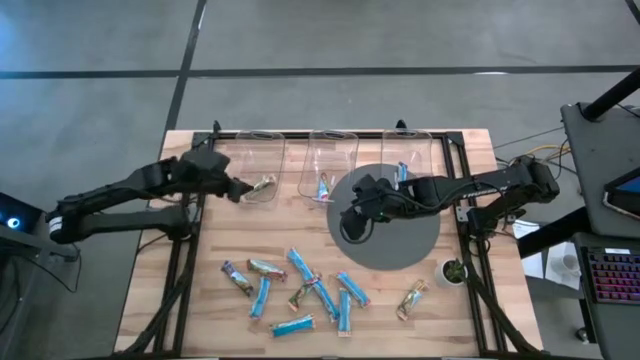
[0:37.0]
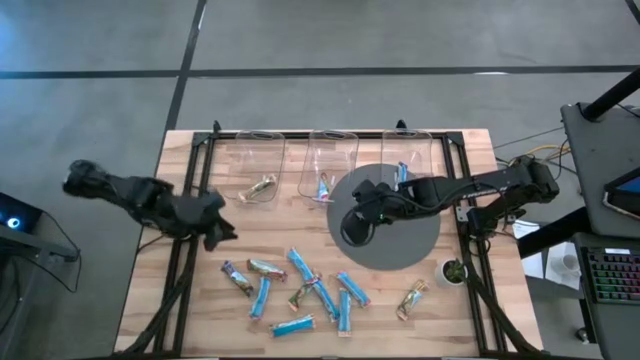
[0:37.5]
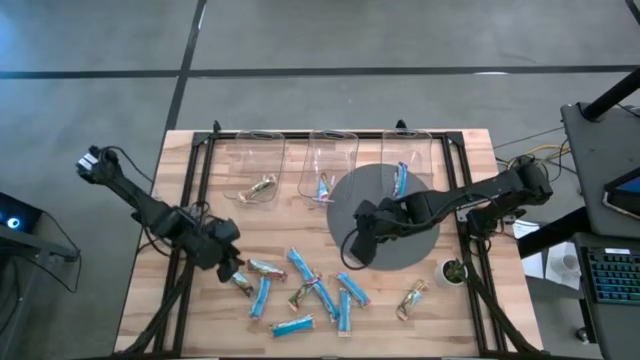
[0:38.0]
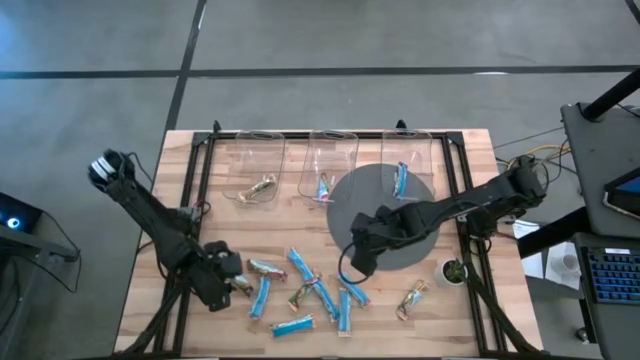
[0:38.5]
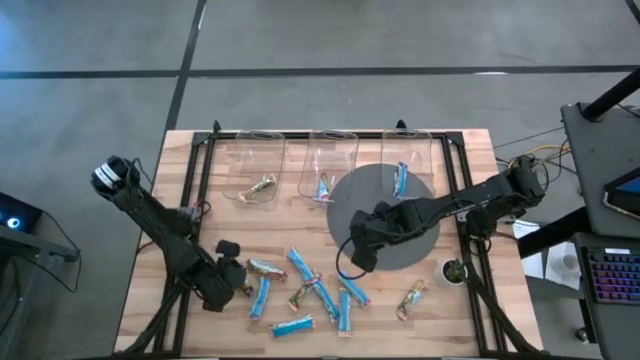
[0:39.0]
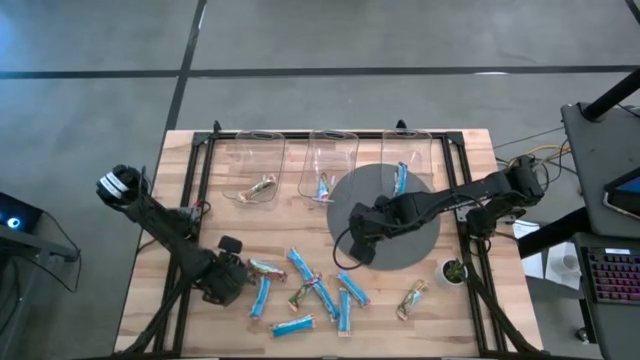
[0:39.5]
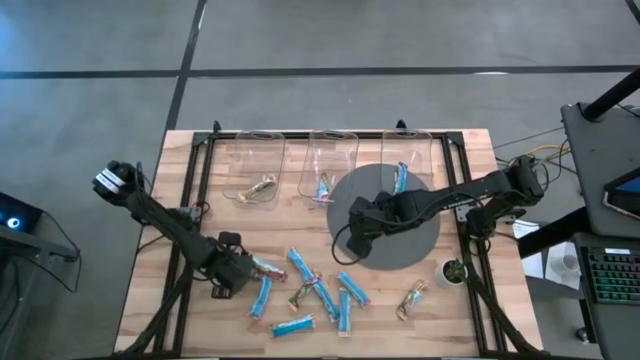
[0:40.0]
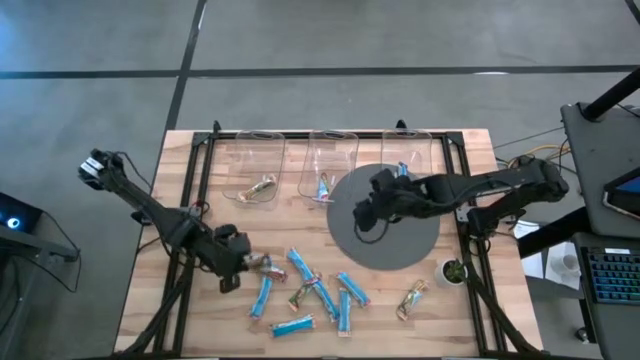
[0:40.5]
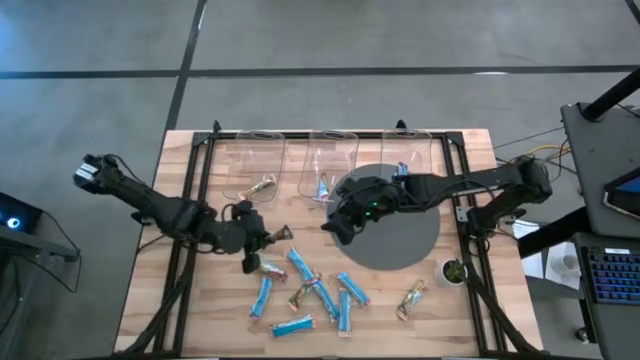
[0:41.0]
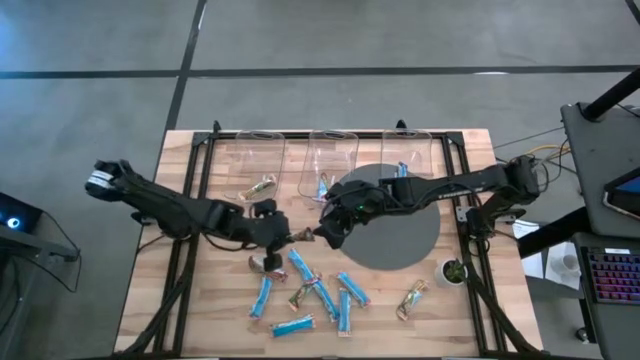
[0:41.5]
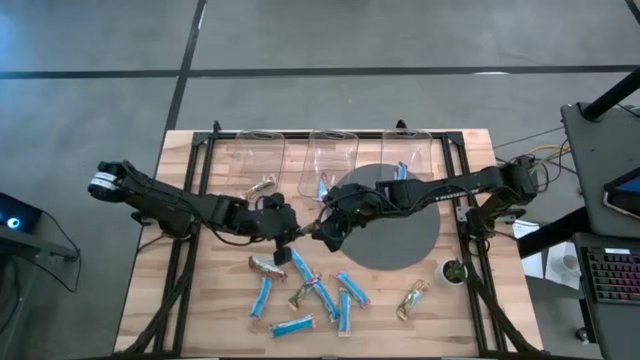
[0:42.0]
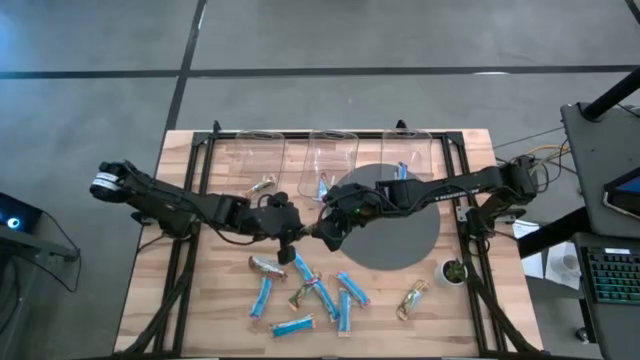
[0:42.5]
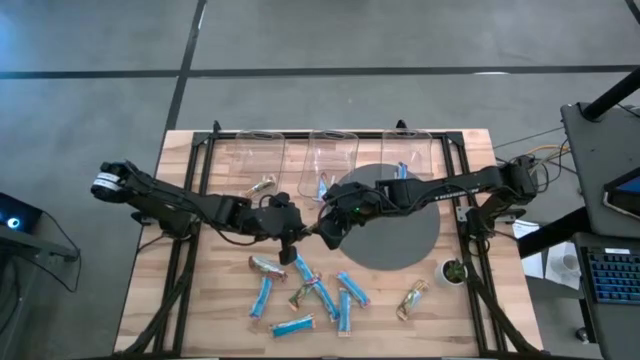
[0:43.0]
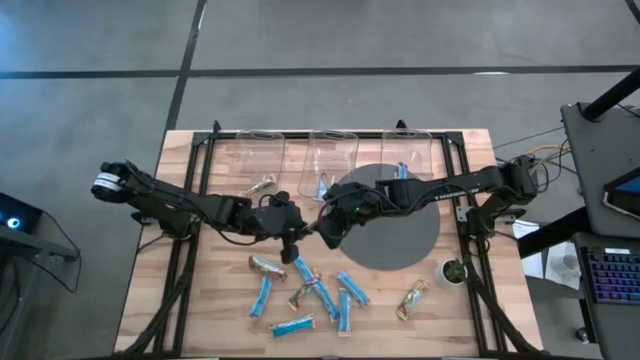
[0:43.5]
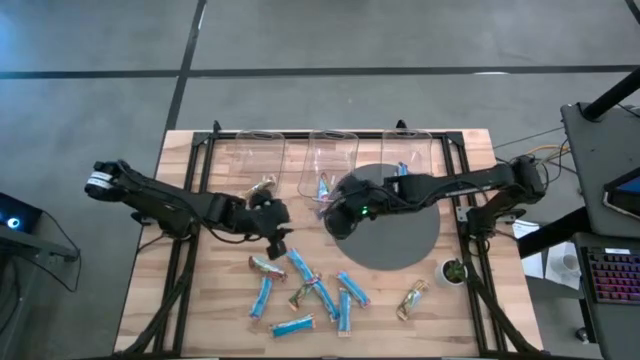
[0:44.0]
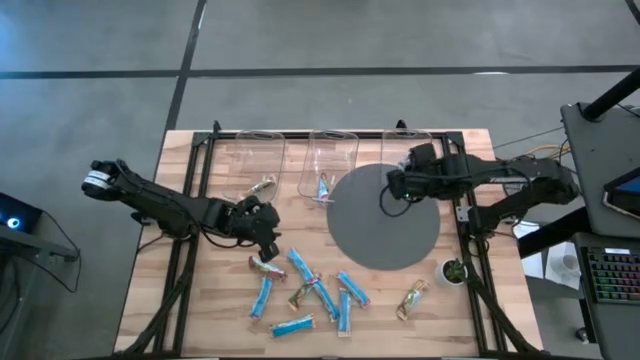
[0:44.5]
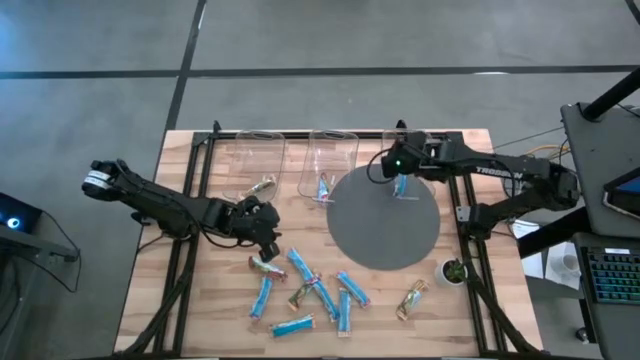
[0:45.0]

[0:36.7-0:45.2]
Task: Pick and place Granola Bars by type
Put the blue granola bar into the right transparent bin

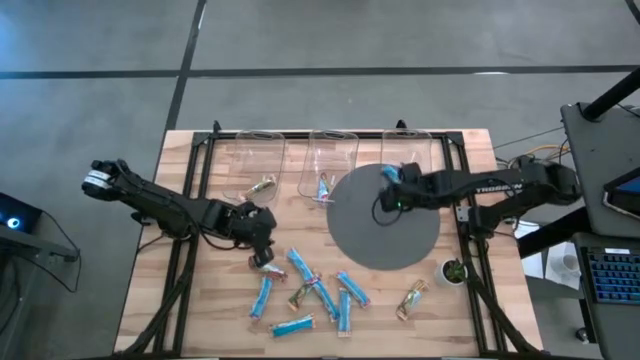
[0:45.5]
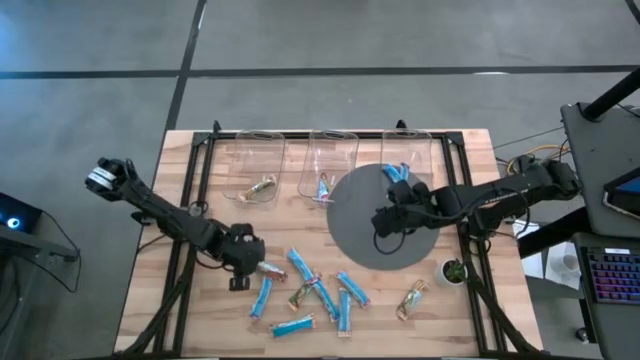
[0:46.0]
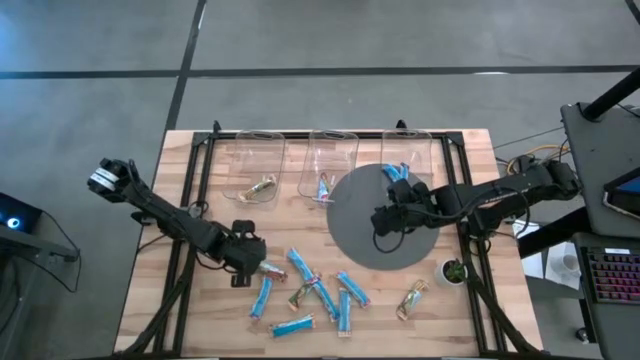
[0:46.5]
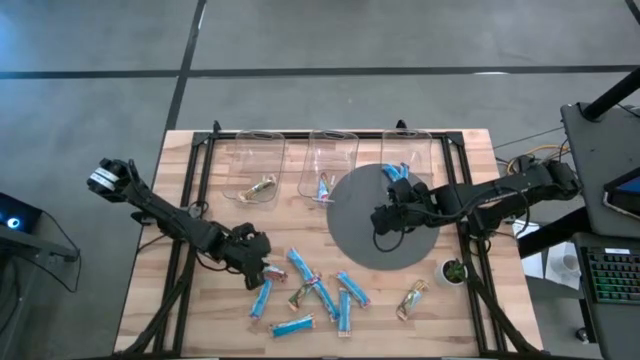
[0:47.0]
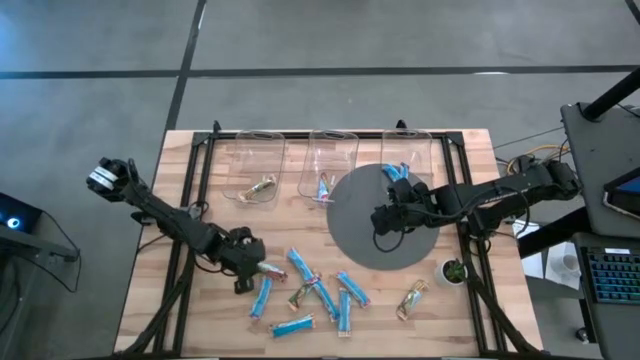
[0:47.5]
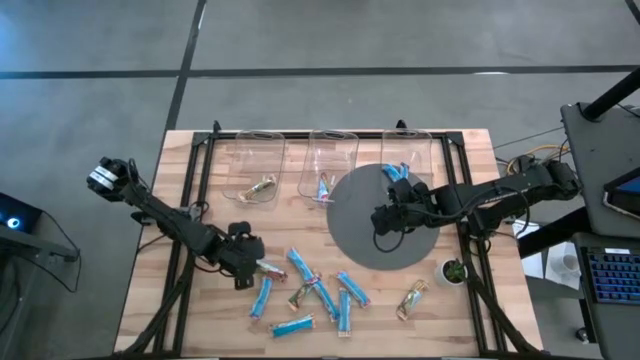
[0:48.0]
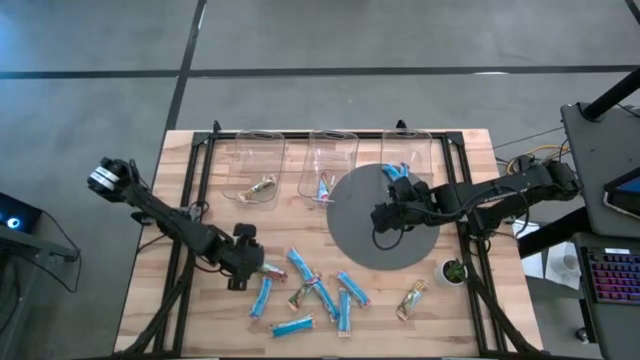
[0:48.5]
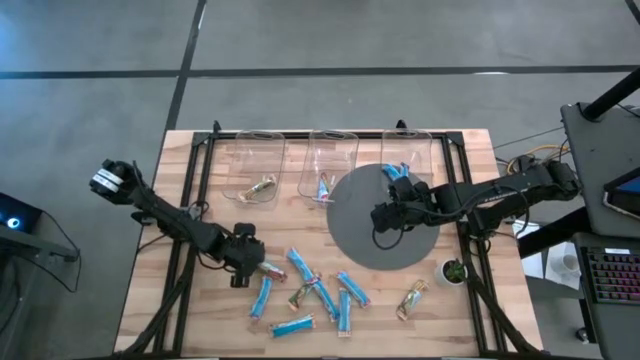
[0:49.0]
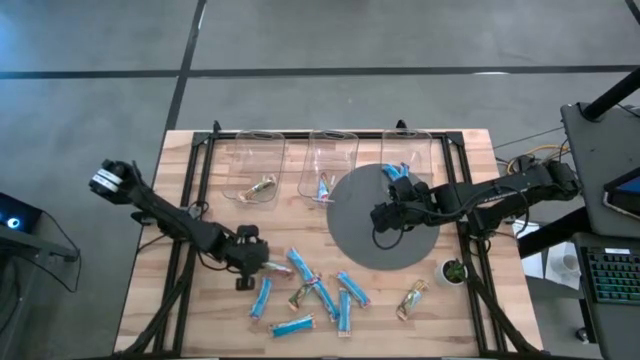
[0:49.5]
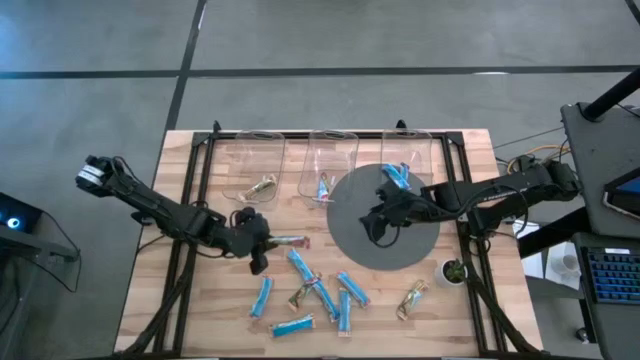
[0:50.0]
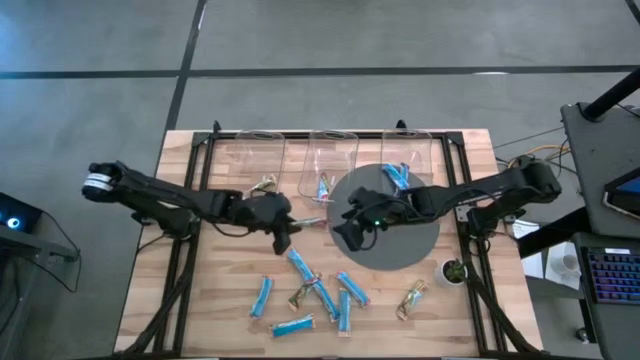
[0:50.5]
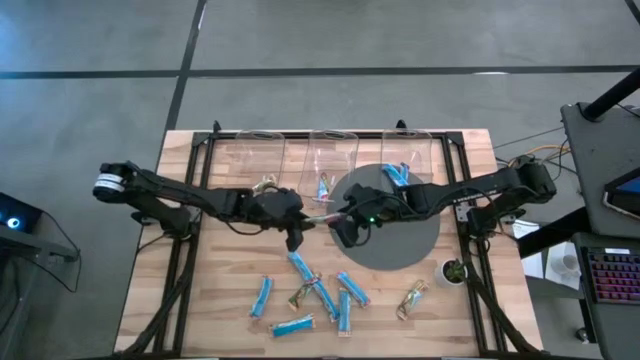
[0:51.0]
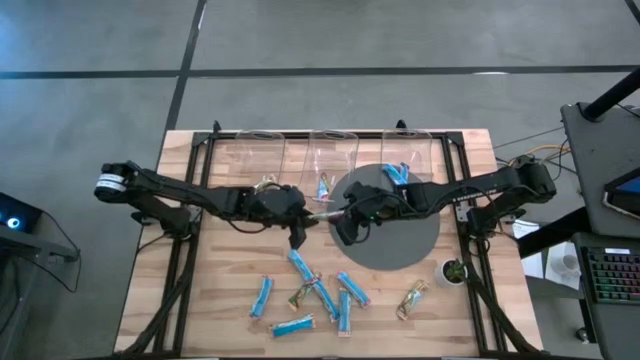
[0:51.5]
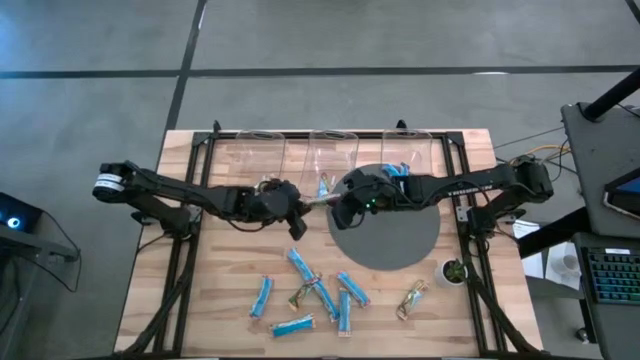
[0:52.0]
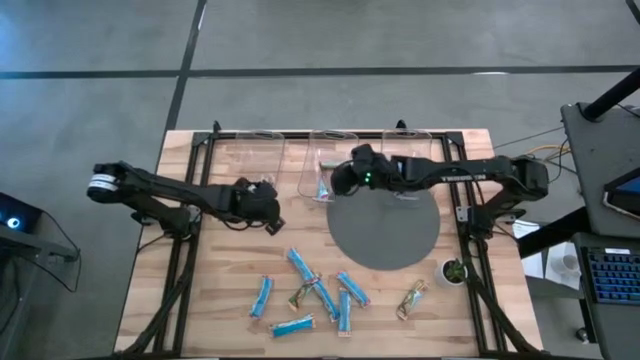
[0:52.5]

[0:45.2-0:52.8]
Put the red granola bar into the middle transparent bin

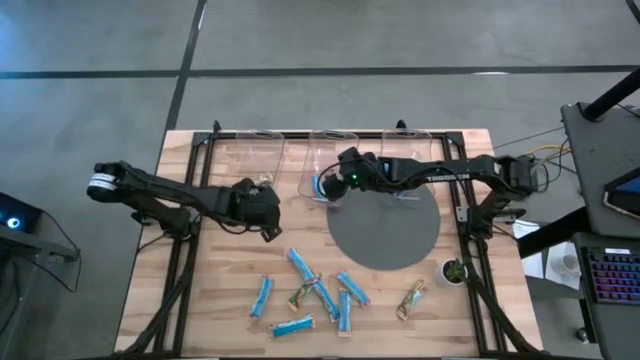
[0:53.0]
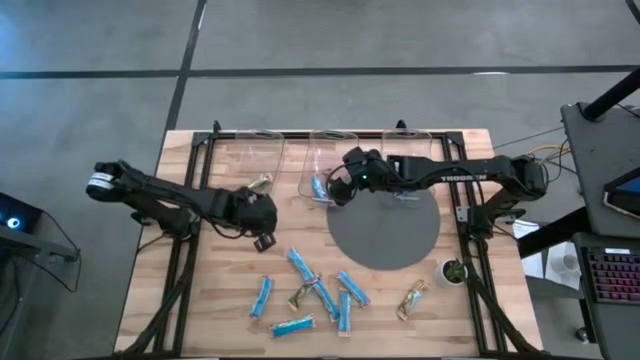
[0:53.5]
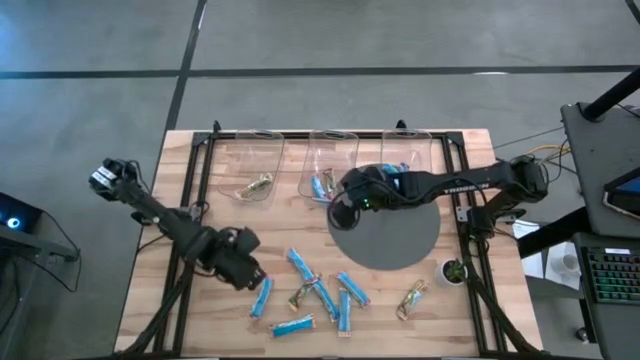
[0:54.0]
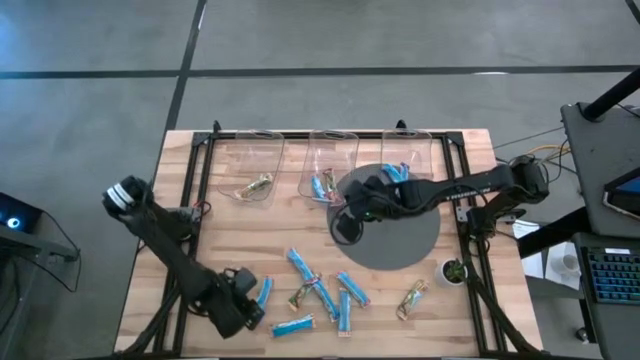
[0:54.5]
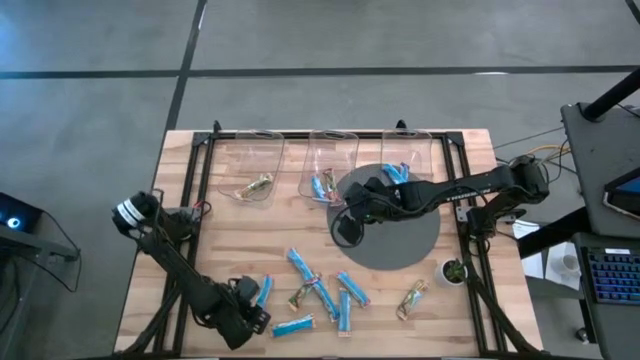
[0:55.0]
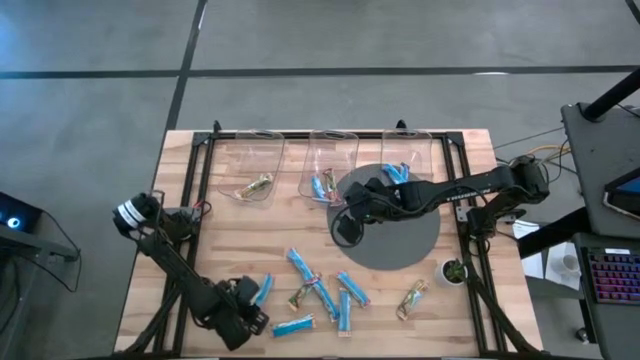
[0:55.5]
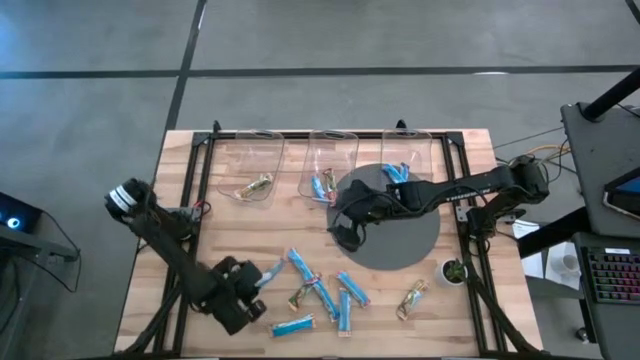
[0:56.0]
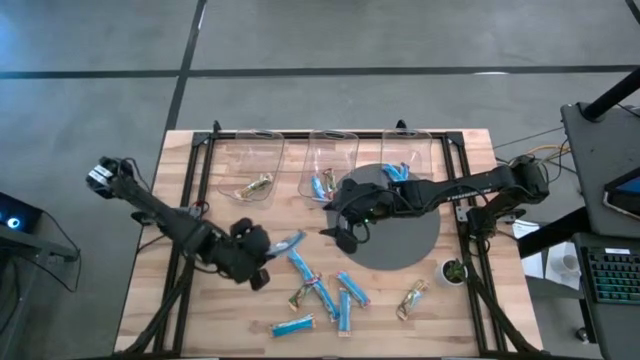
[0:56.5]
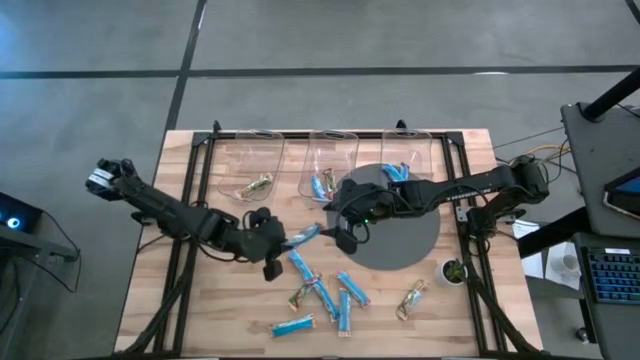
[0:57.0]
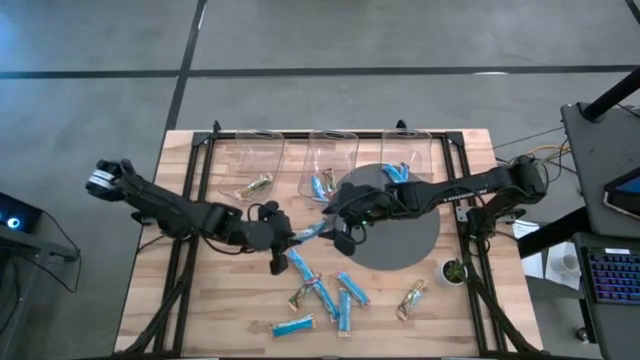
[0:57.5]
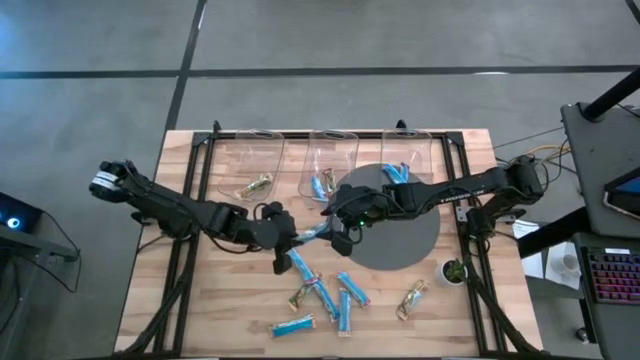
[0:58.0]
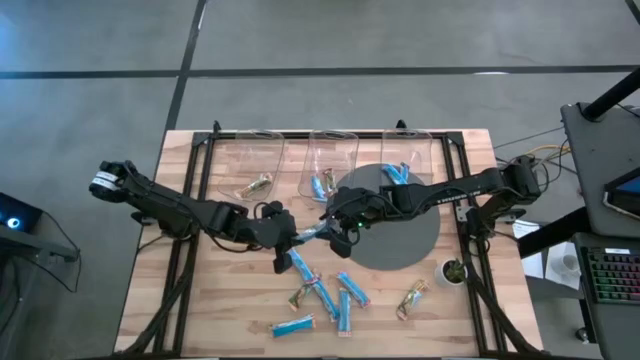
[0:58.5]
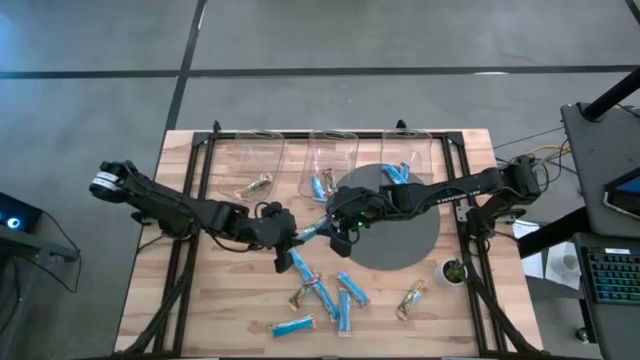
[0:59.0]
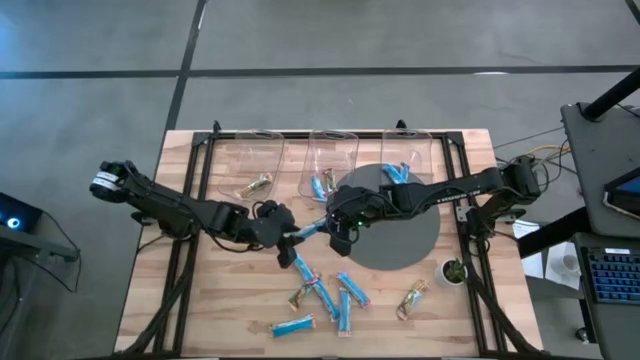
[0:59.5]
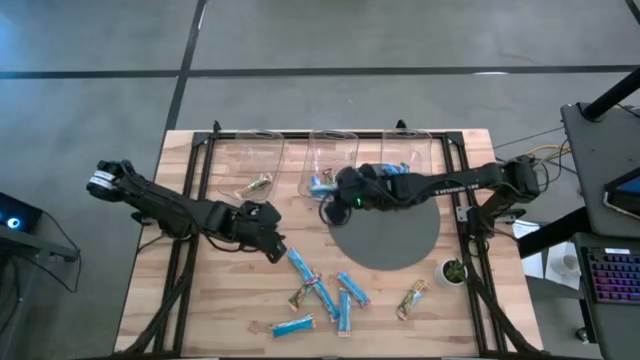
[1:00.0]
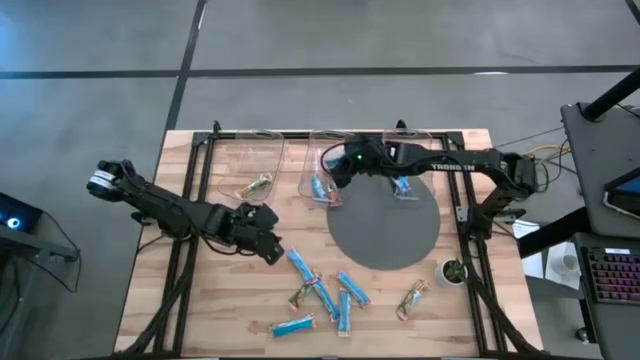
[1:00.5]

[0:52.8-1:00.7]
Put the red granola bar into the middle transparent bin
